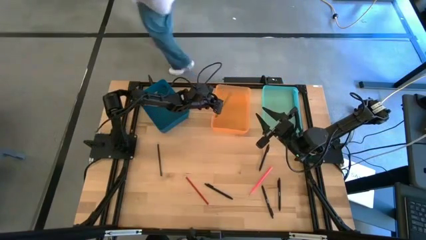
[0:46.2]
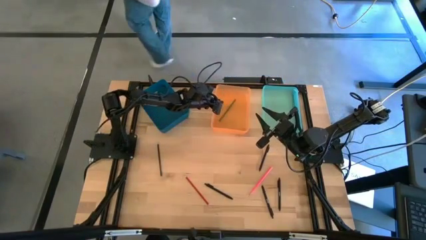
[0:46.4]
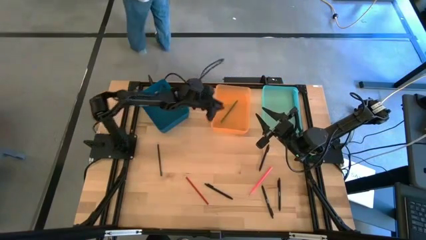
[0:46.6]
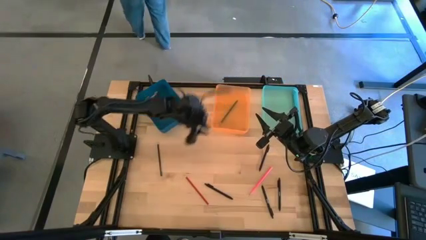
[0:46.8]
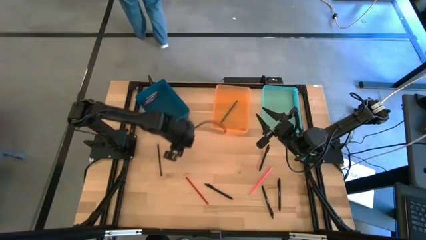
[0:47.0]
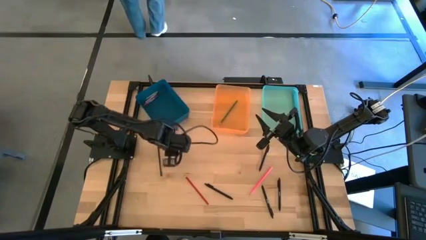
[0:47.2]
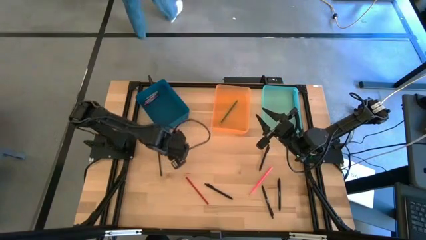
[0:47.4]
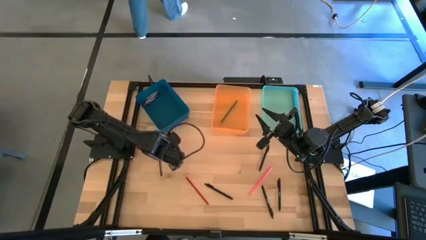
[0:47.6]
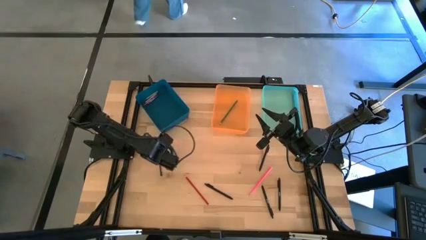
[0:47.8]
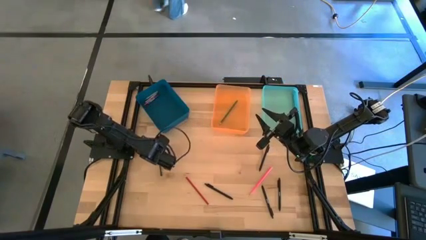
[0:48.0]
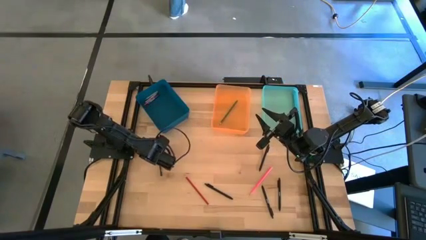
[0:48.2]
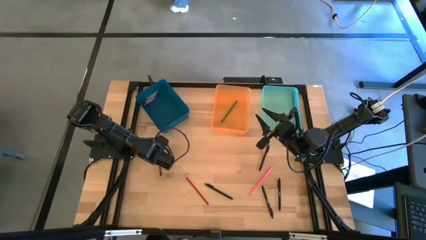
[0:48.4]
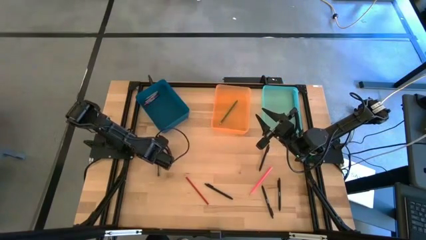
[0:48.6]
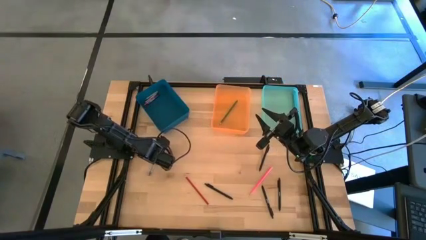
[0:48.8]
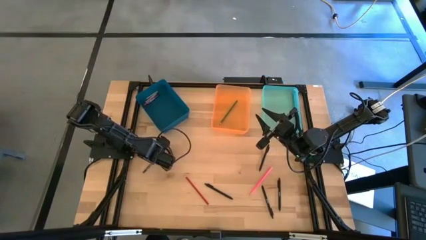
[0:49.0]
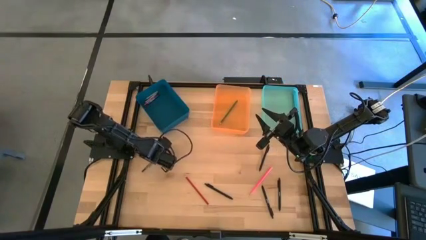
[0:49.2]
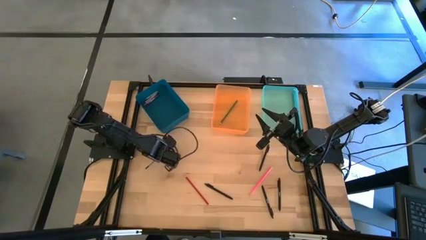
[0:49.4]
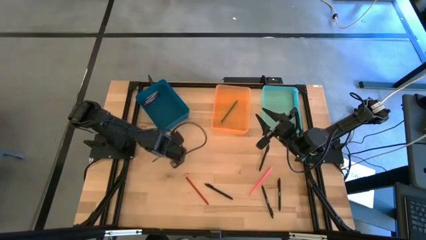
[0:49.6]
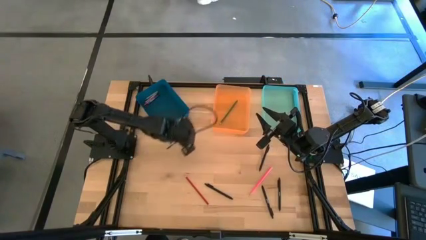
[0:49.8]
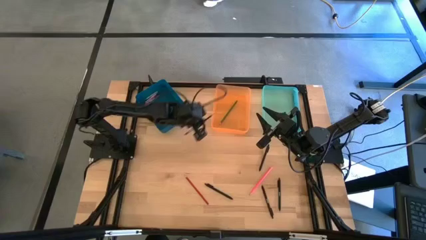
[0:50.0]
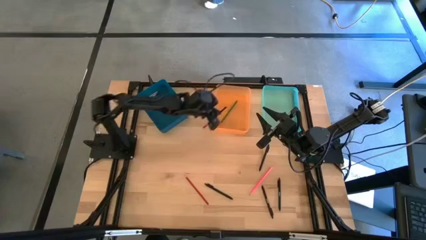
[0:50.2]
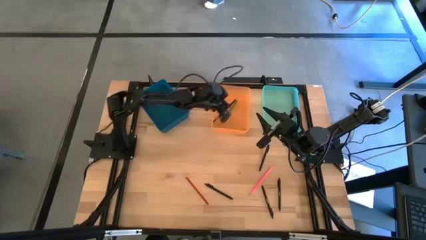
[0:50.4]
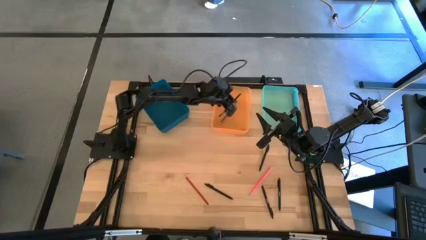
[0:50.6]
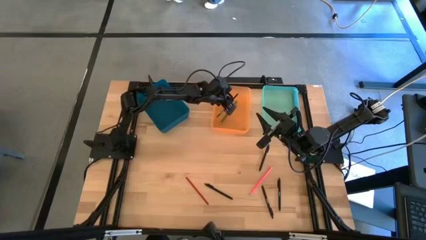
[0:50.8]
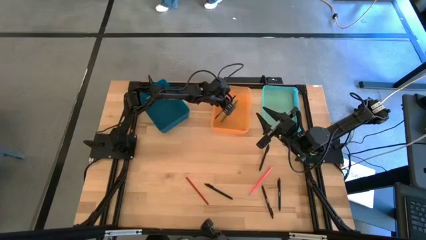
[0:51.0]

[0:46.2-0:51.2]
Task: Sort crayons/erasers/pens/pencils in bins
Put the blue colored pencil into the orange bin

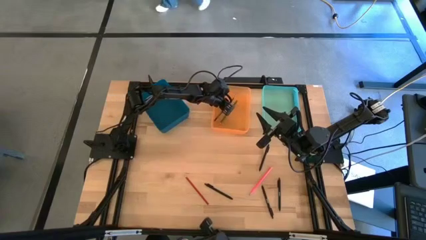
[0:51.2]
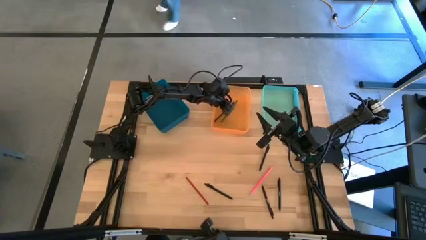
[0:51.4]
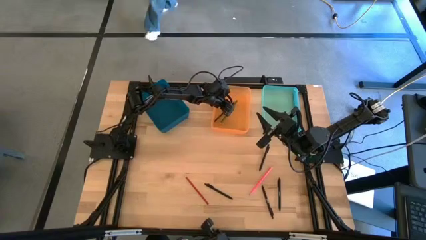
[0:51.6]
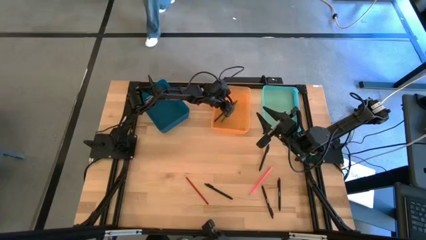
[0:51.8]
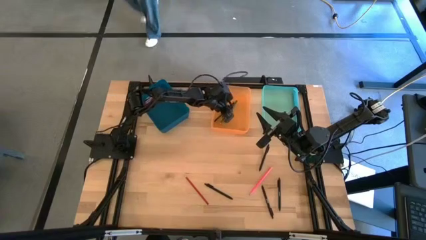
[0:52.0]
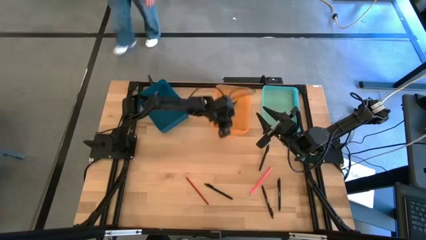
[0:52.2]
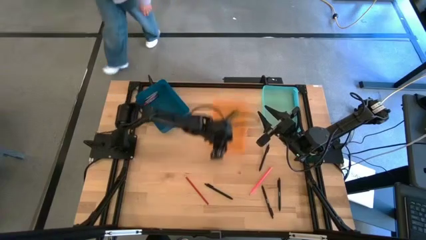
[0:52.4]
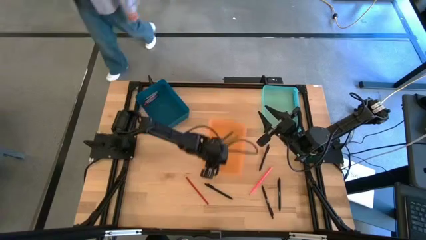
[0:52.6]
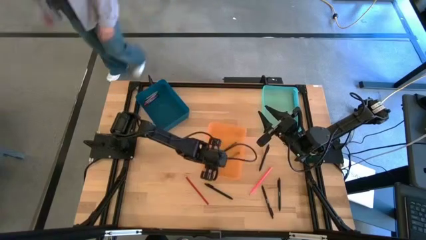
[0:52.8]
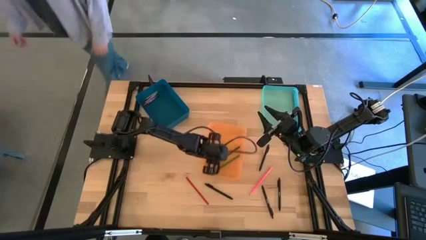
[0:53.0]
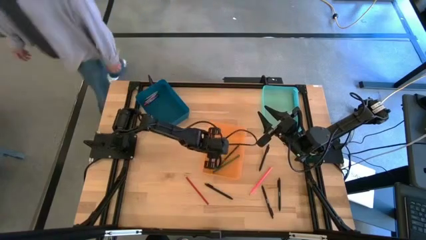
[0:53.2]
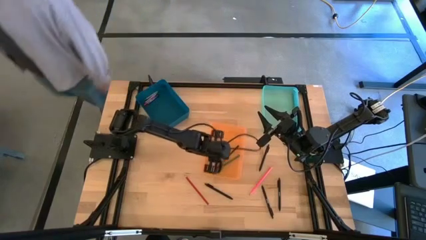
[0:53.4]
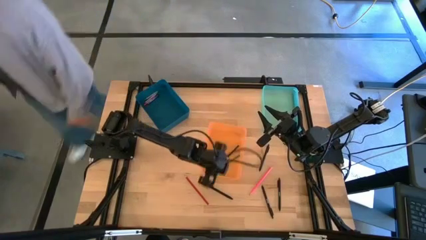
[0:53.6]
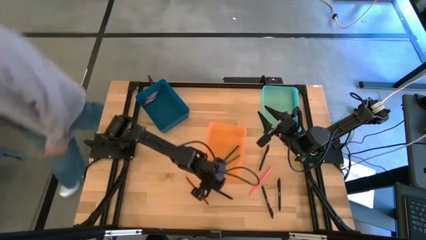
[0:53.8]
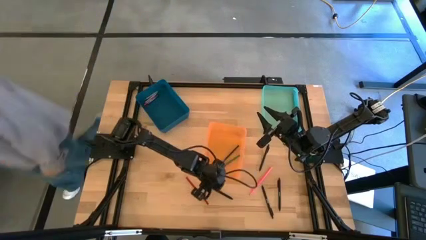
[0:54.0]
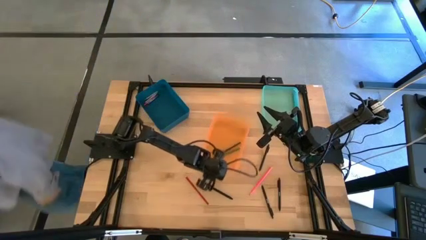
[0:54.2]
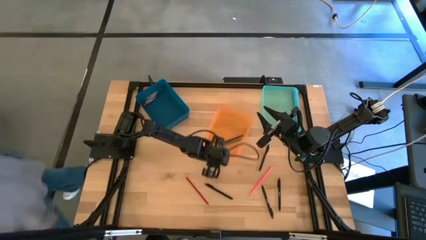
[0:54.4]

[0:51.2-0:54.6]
Adjust the orange bin

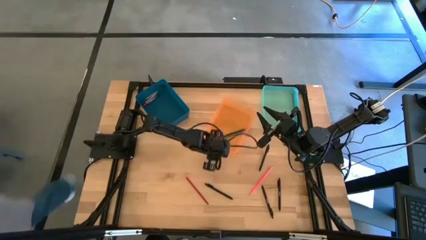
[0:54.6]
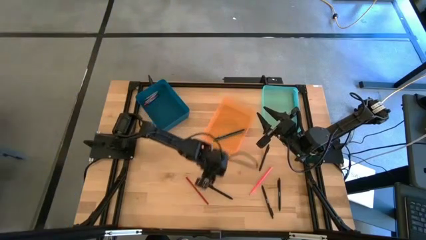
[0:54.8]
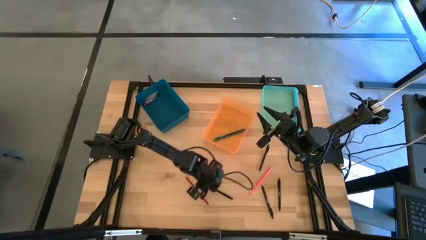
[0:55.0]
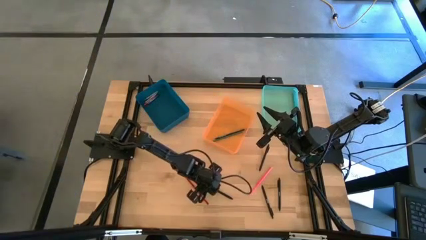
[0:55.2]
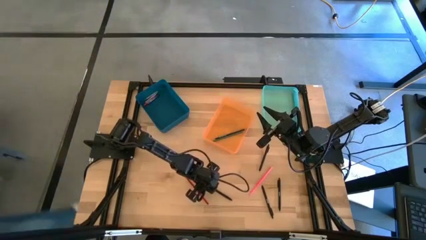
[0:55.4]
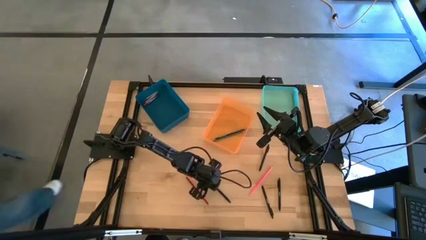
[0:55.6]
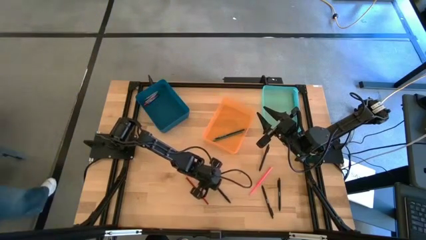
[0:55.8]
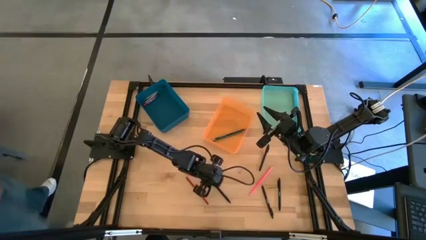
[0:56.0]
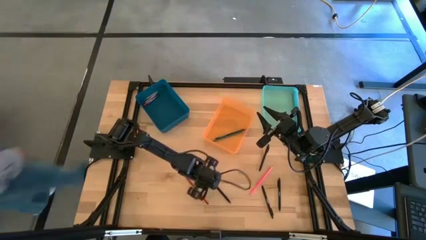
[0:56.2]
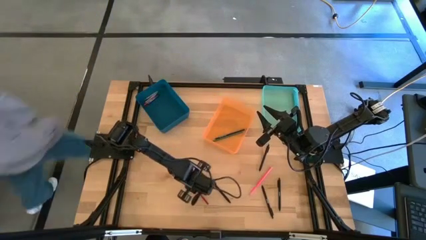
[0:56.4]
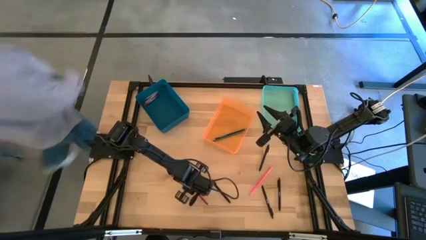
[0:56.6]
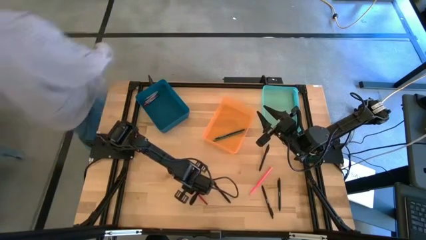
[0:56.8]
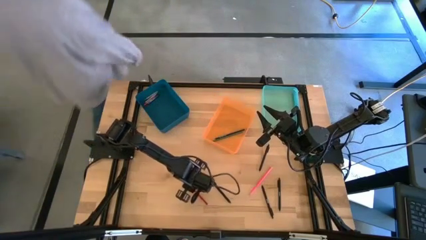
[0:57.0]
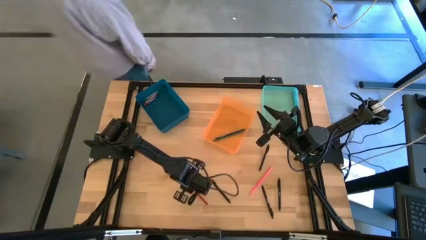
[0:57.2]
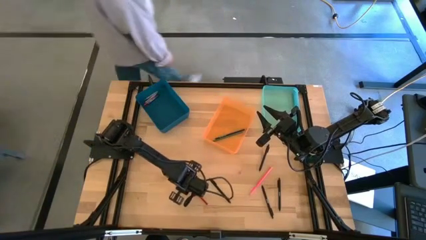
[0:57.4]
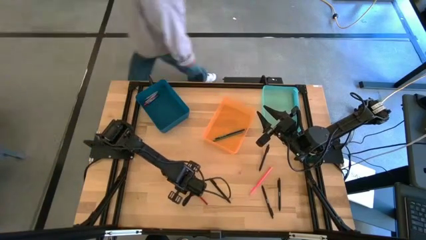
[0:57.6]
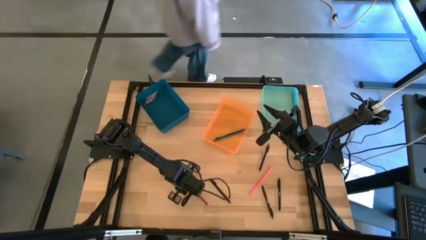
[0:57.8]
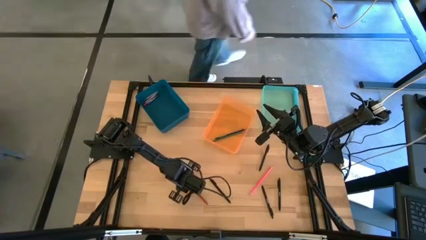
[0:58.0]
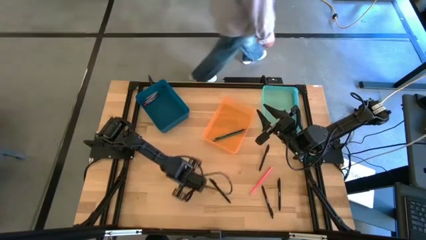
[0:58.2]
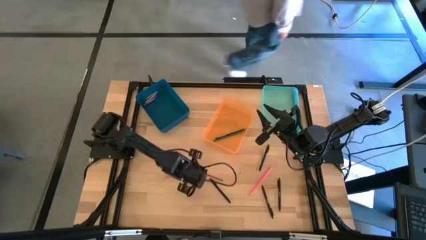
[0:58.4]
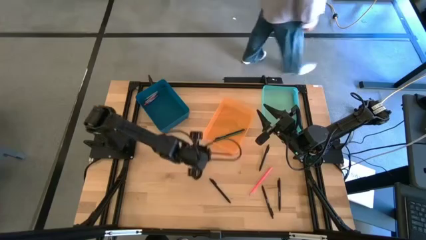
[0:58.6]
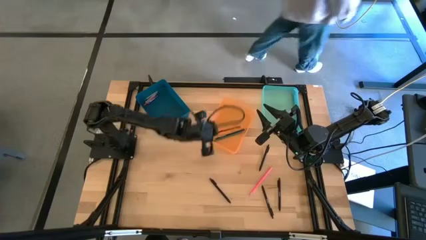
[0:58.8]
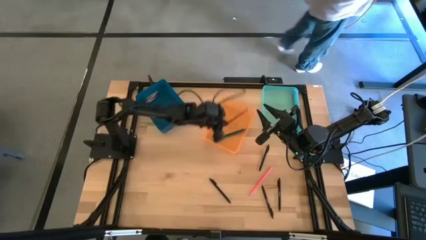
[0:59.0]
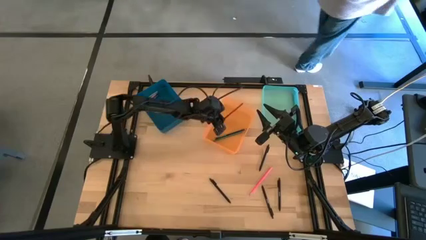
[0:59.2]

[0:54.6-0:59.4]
Put the red colored pencil into the orange bin

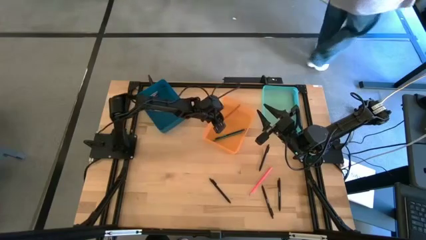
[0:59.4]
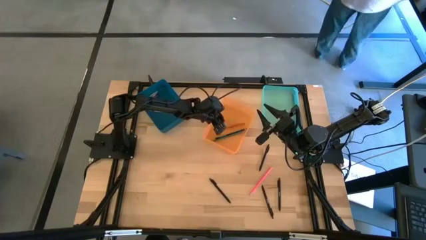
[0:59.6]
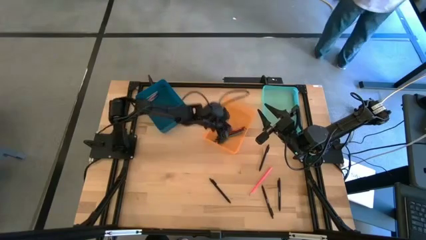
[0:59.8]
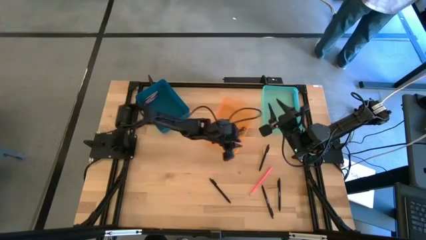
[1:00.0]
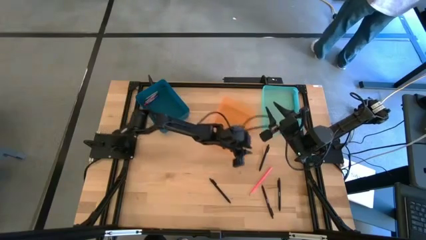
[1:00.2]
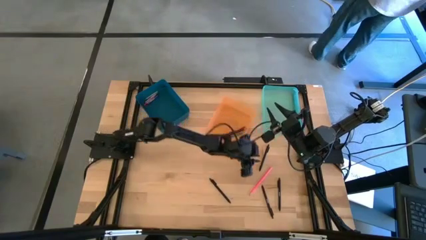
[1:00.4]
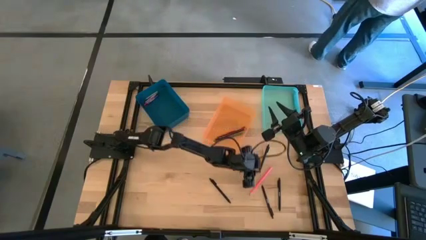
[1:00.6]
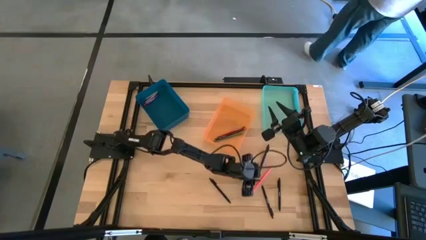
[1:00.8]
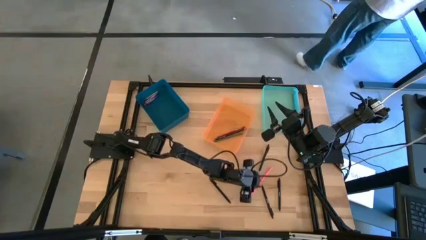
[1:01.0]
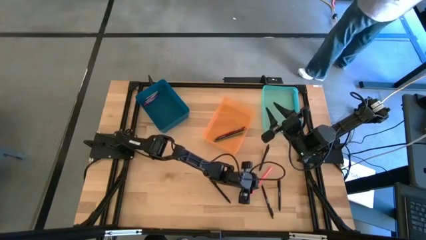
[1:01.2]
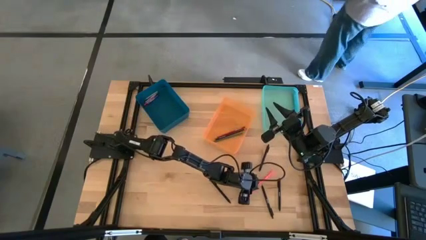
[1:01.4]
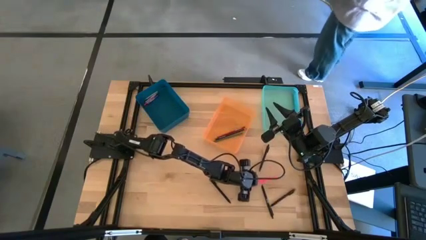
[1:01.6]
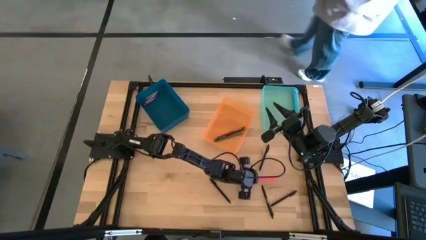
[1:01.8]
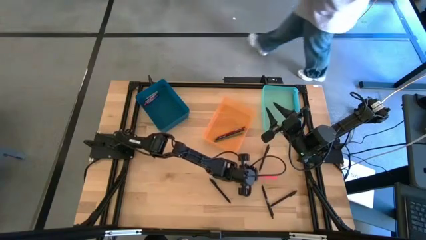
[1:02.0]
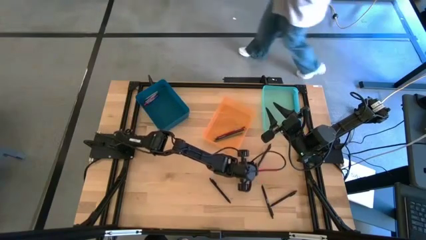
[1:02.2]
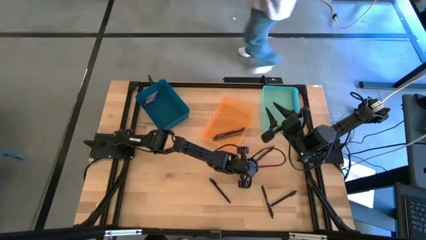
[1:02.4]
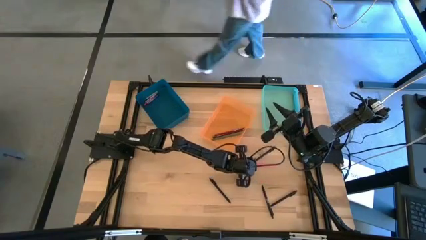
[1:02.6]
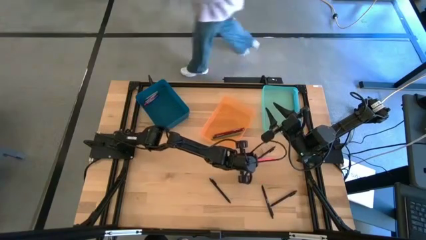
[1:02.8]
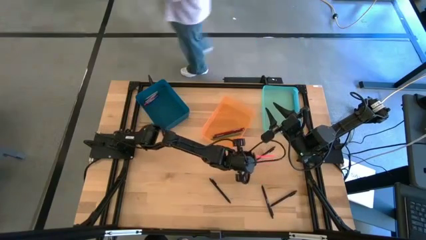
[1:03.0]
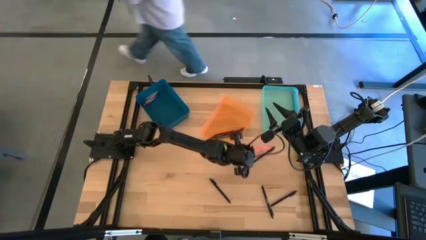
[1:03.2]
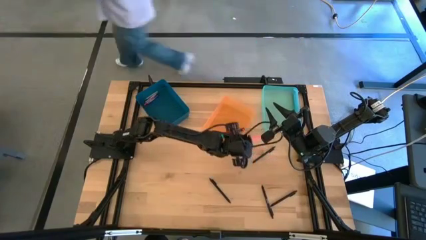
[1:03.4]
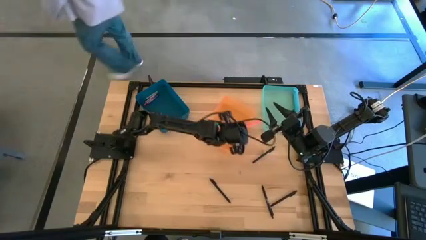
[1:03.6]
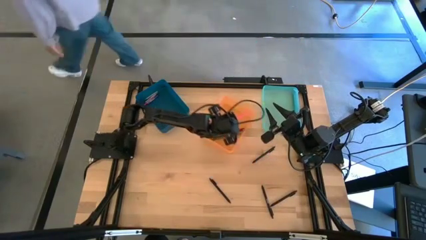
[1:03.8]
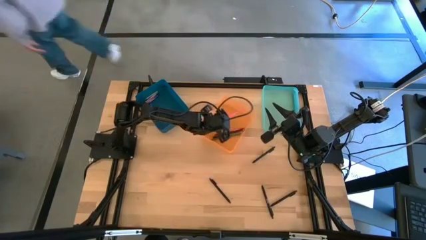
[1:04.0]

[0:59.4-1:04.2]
Put the pink colored pencil into the orange bin
